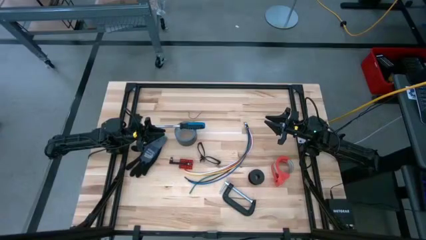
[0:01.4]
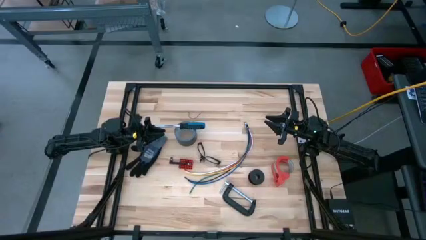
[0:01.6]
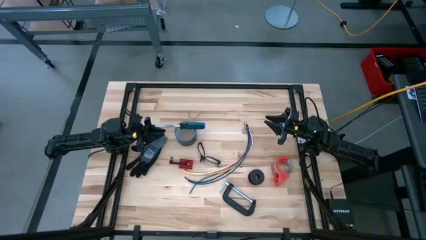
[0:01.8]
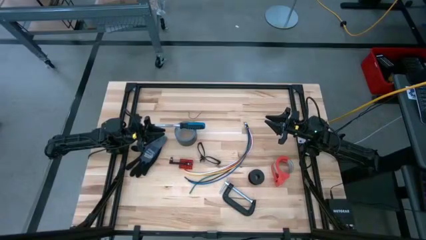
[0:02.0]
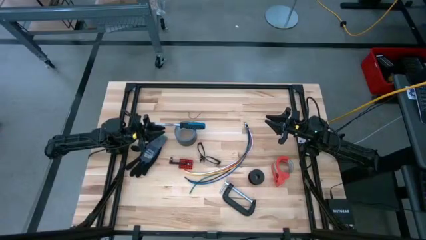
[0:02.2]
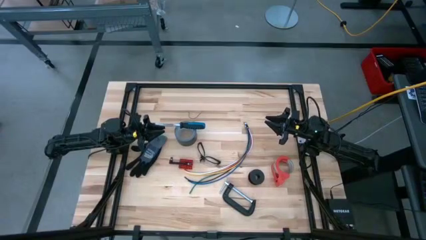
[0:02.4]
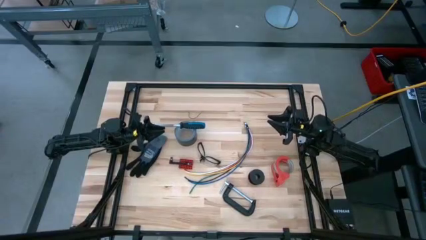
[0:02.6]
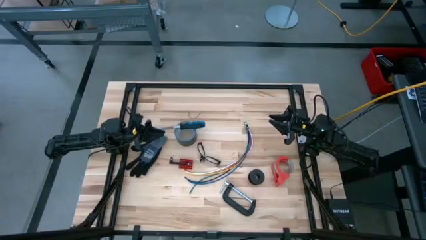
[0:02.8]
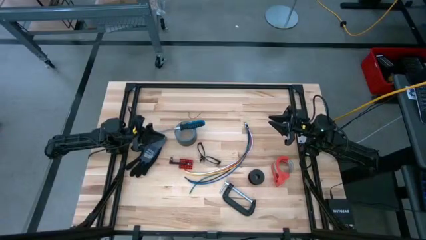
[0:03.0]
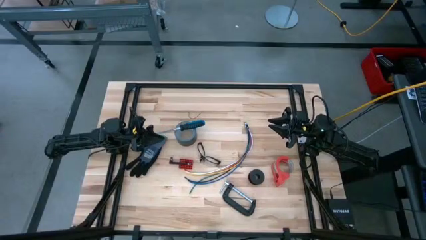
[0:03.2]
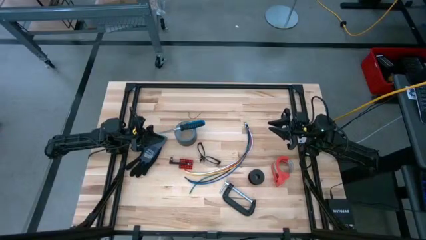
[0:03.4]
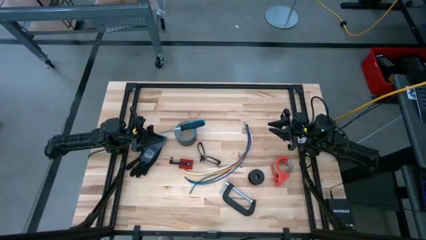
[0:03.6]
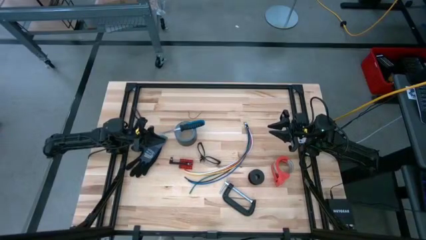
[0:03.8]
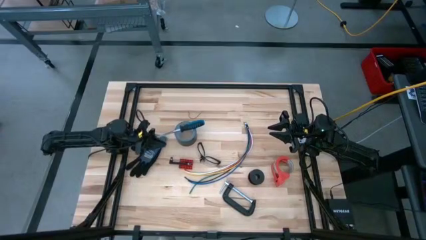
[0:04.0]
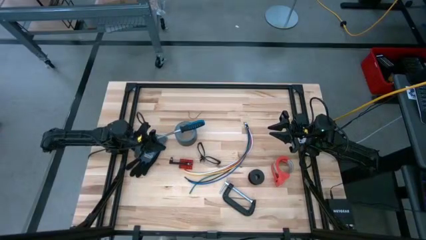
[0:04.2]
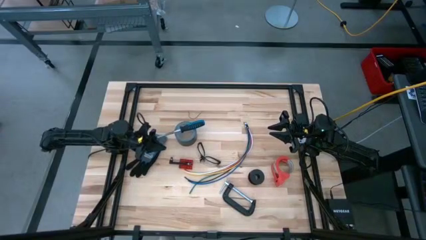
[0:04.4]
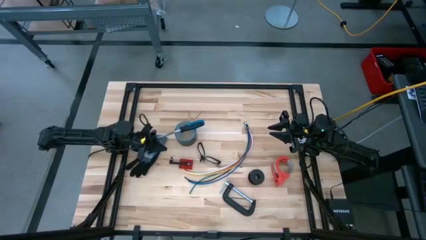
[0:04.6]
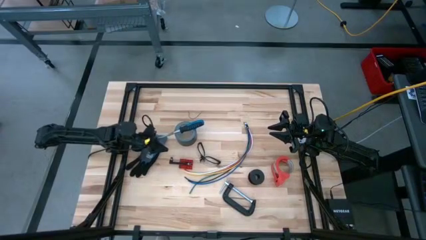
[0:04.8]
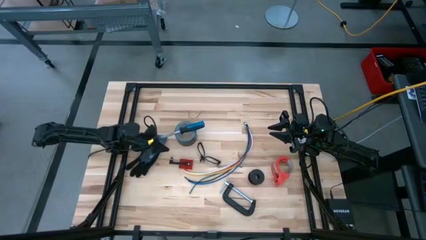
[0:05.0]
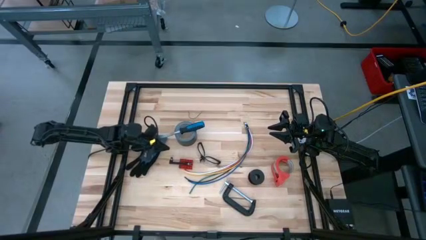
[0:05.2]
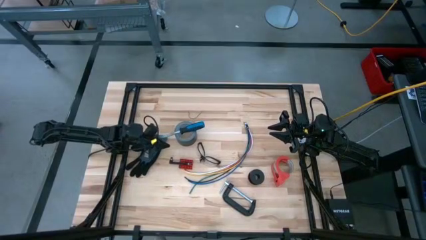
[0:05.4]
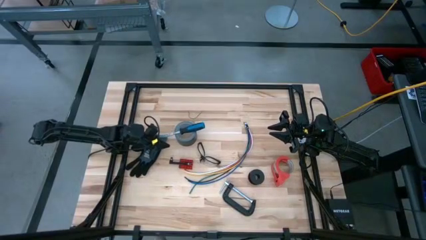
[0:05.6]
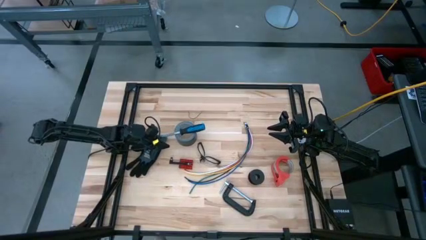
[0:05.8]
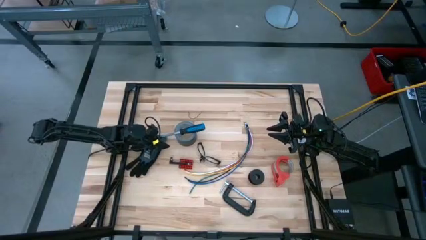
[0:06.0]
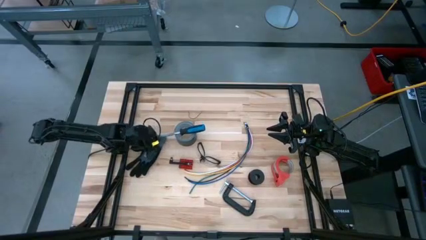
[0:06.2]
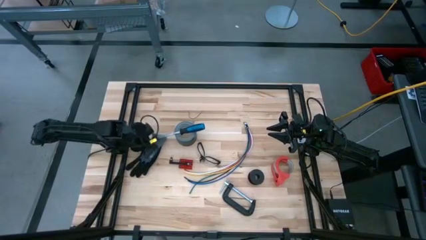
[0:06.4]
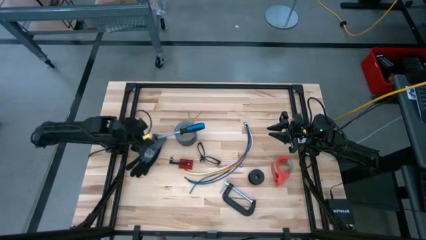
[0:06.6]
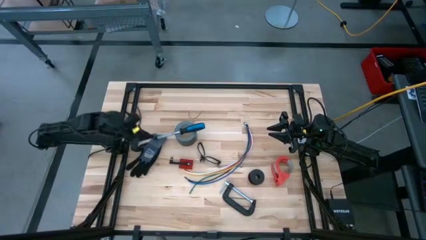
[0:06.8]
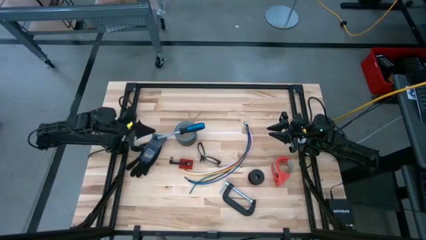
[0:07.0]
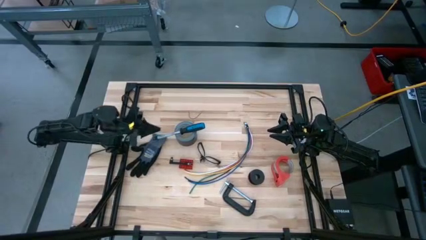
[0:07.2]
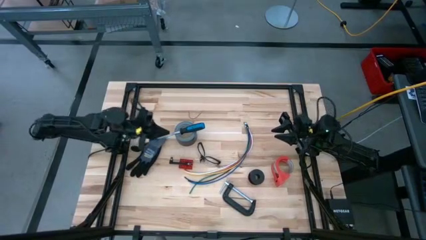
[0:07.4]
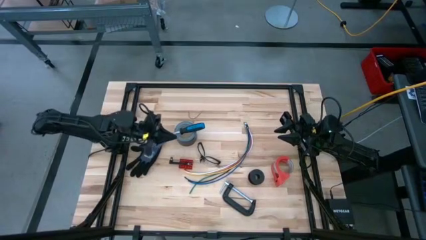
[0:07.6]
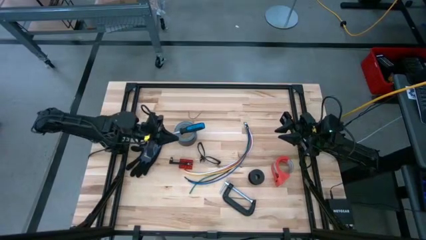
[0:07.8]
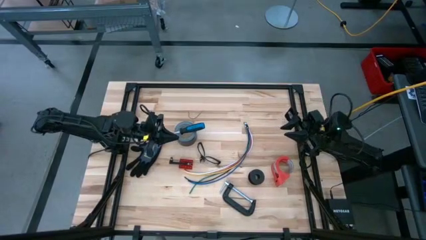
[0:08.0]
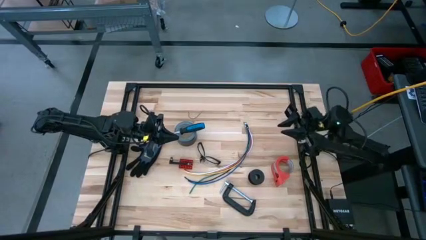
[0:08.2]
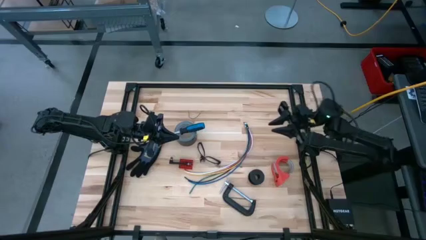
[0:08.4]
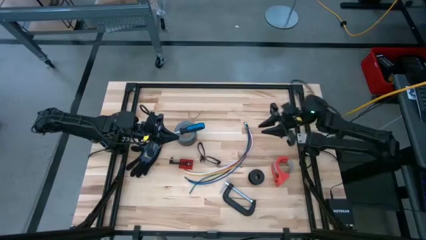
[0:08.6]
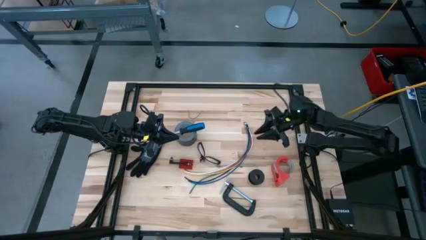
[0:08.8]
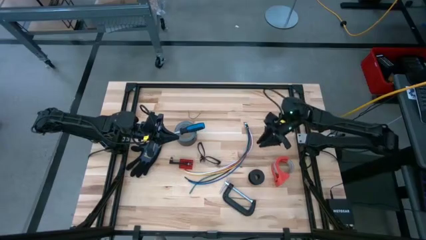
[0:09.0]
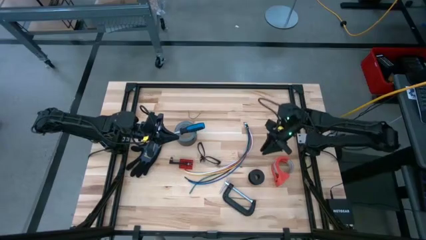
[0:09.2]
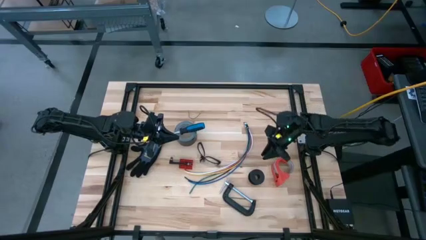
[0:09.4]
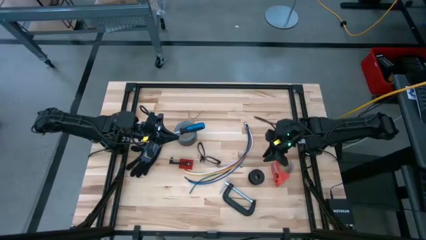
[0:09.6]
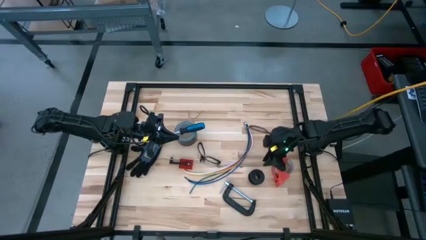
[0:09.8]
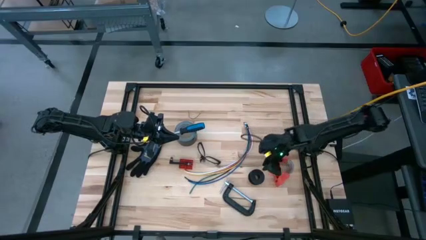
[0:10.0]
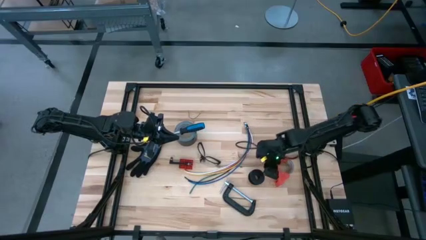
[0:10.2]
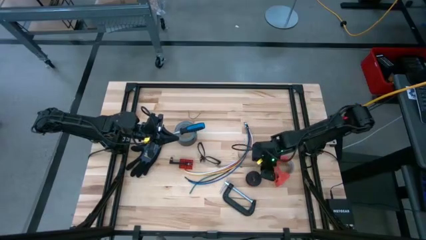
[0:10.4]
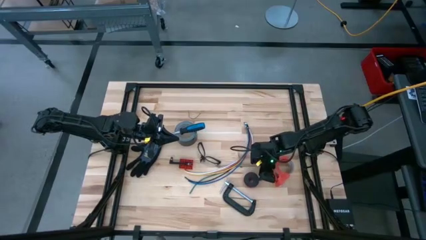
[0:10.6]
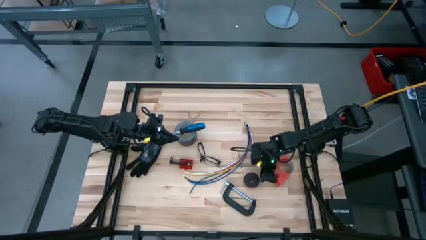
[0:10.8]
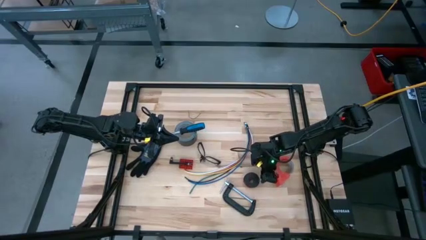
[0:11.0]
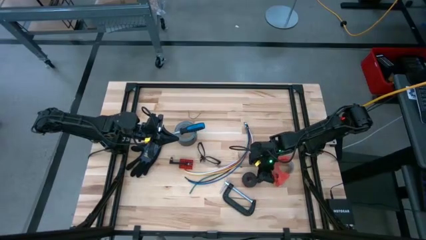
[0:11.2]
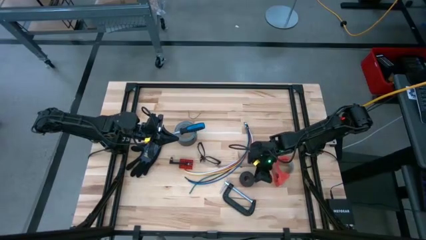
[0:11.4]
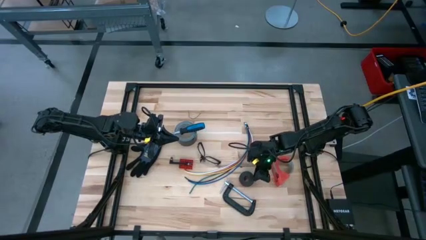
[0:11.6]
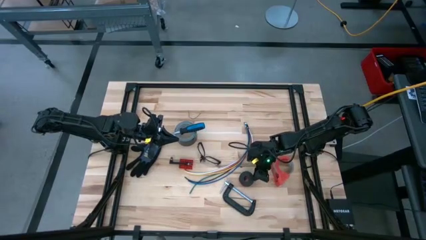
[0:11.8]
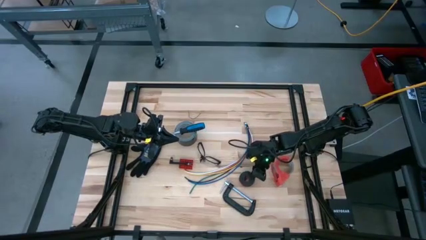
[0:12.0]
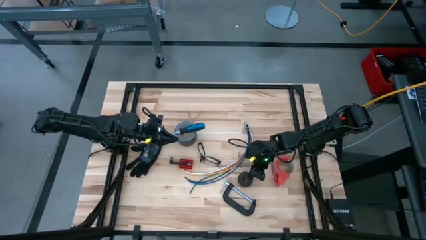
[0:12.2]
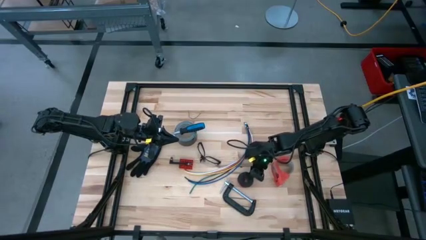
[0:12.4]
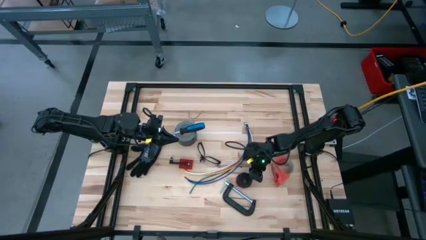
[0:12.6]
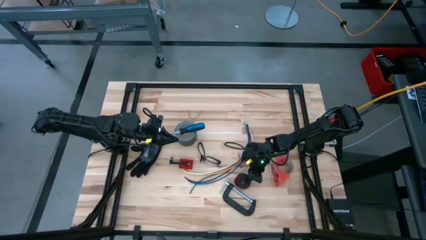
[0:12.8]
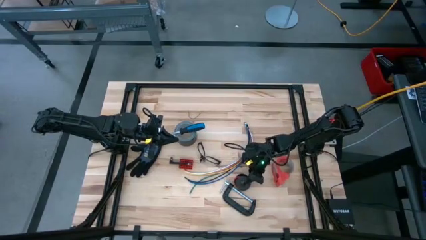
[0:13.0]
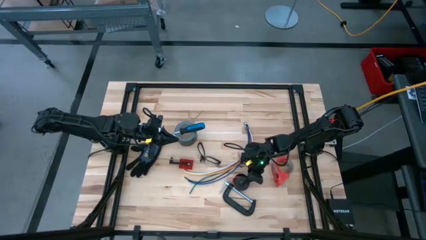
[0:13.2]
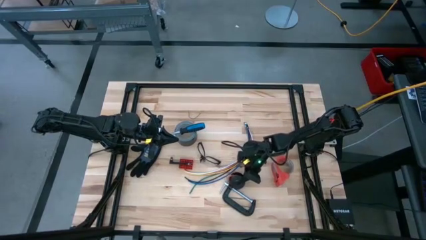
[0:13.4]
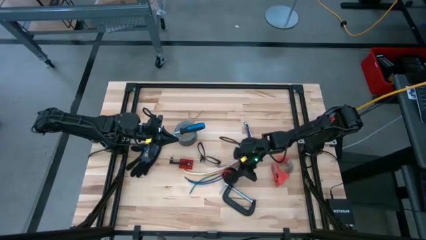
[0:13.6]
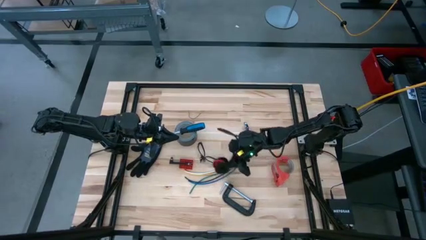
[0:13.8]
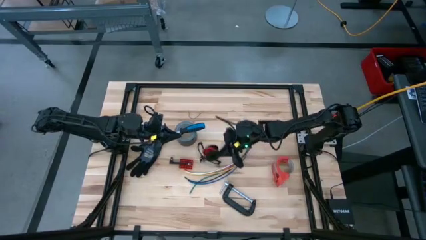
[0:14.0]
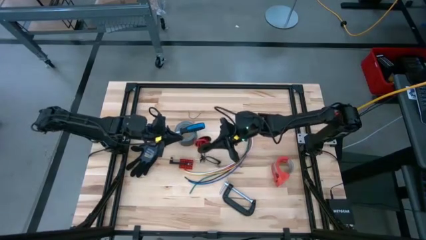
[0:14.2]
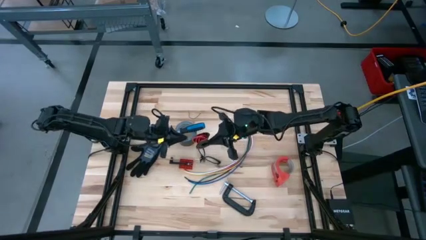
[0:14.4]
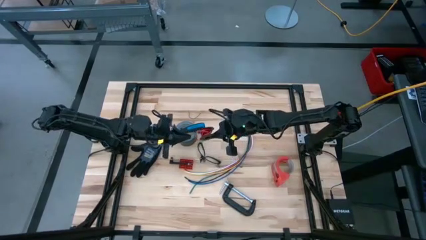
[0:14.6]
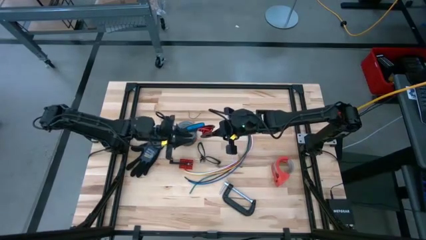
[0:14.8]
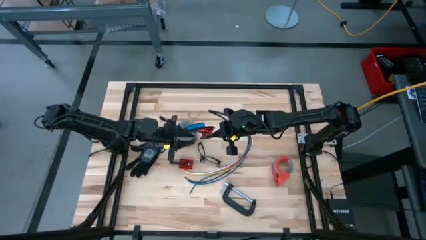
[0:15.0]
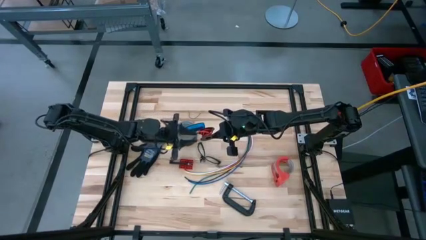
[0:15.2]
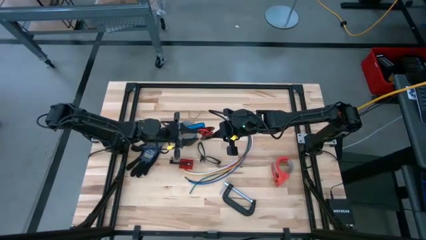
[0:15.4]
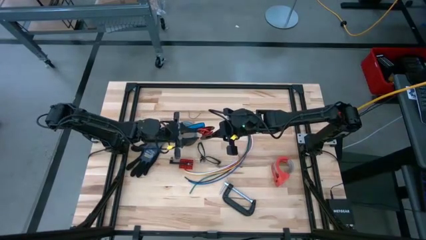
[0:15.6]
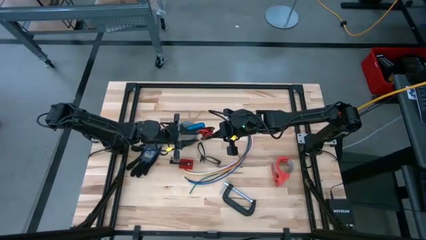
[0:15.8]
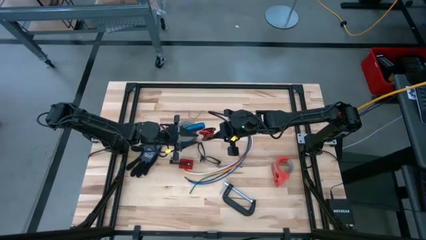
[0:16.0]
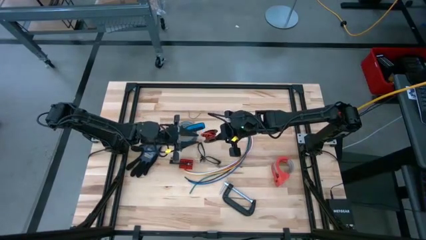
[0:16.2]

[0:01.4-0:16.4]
Task: Coil cords
Uncoil the red wire from the black spool
